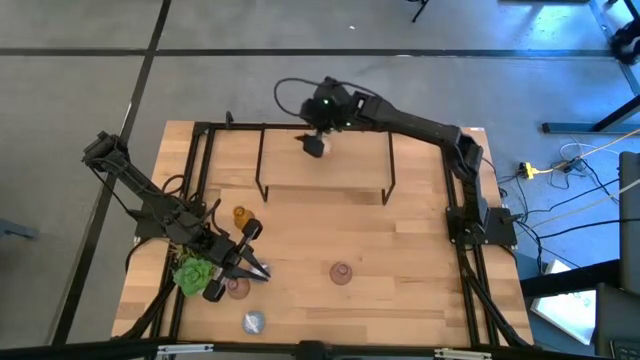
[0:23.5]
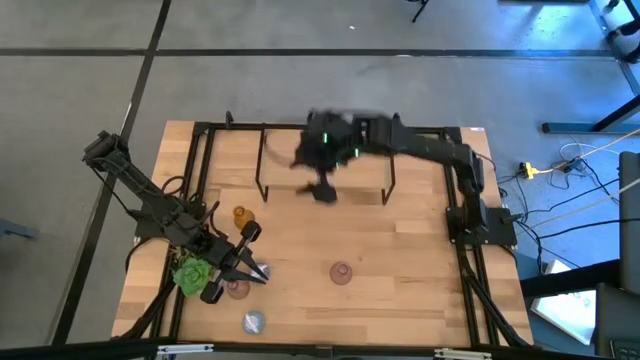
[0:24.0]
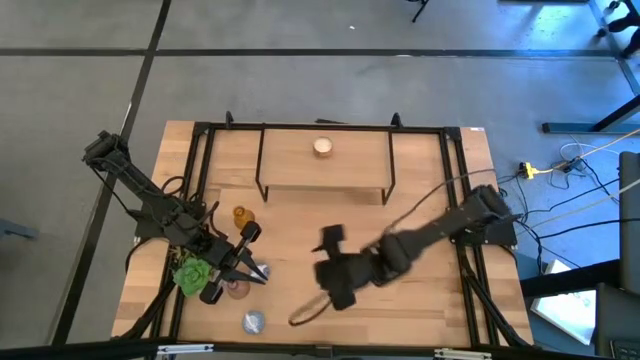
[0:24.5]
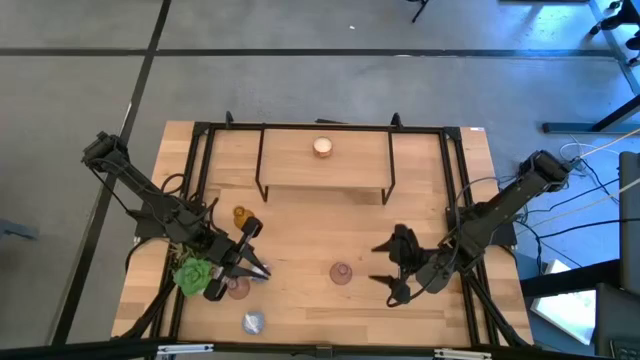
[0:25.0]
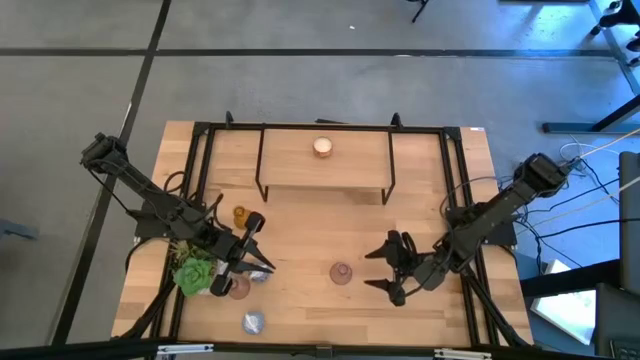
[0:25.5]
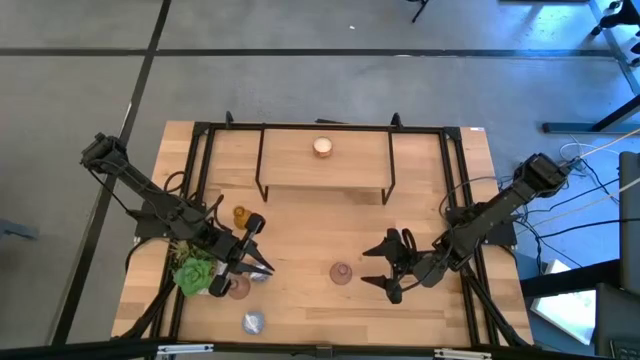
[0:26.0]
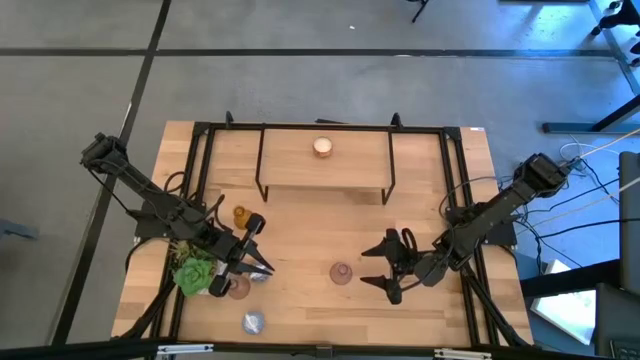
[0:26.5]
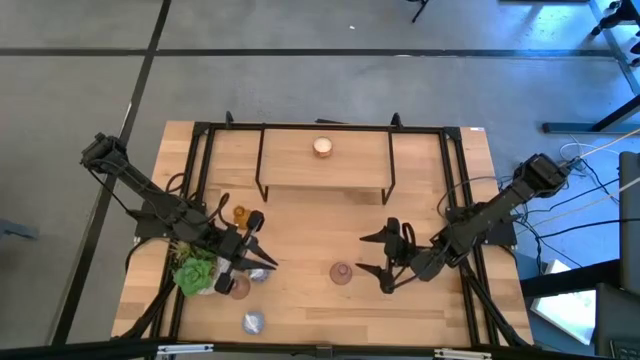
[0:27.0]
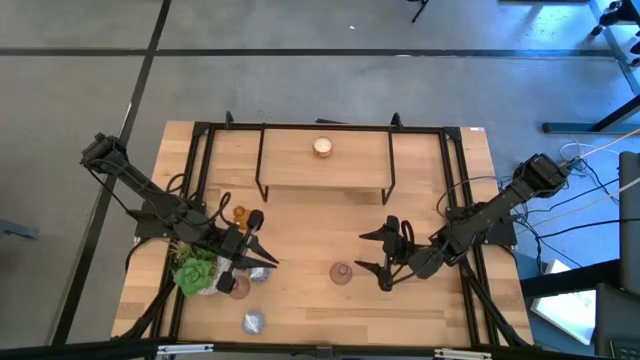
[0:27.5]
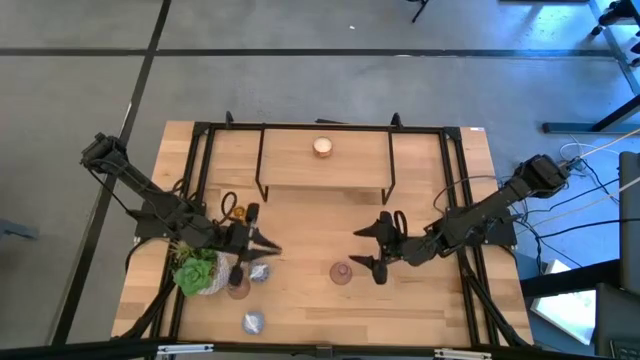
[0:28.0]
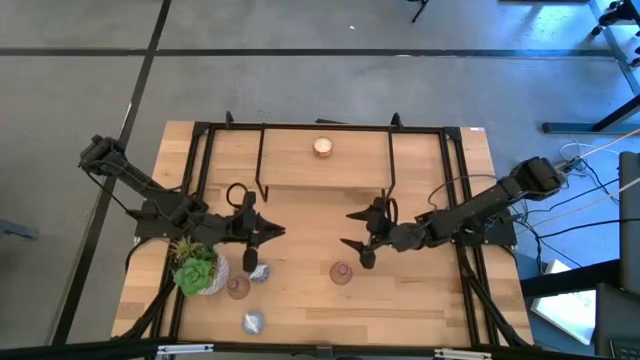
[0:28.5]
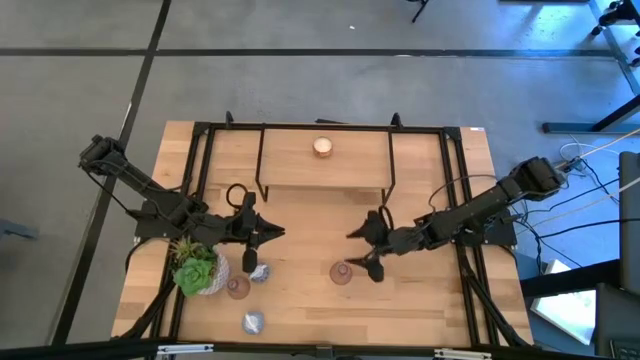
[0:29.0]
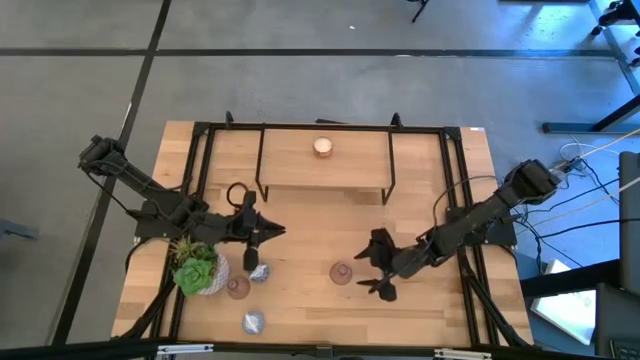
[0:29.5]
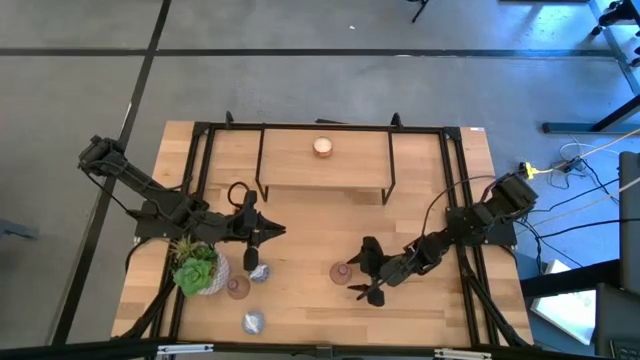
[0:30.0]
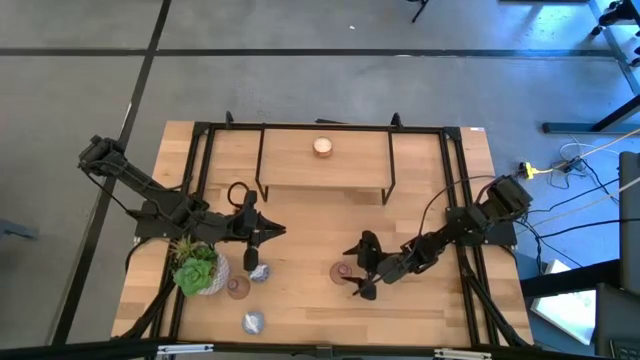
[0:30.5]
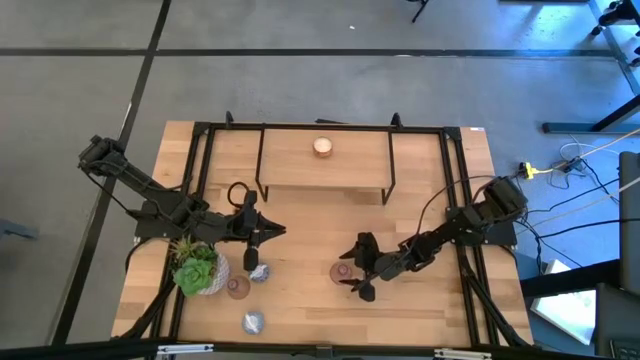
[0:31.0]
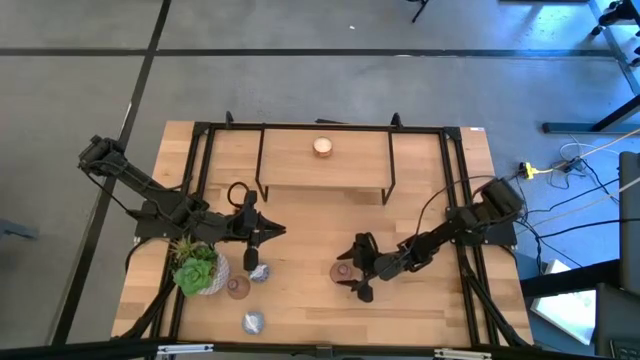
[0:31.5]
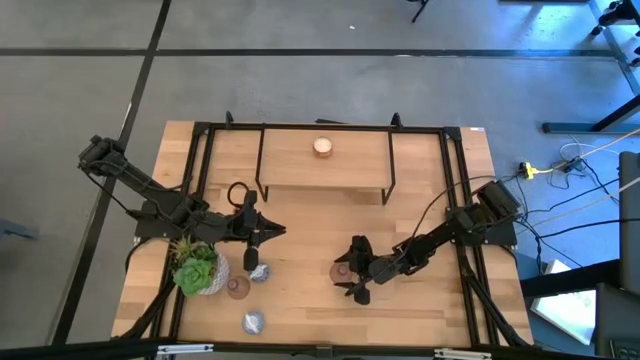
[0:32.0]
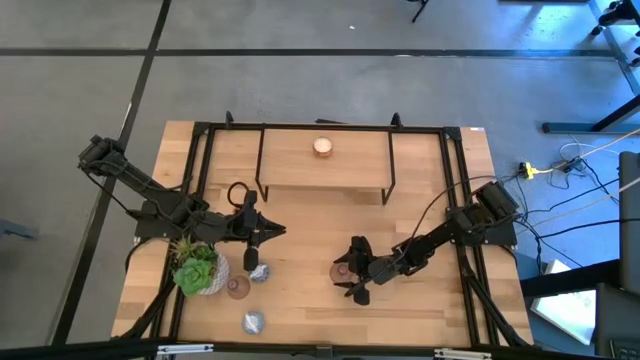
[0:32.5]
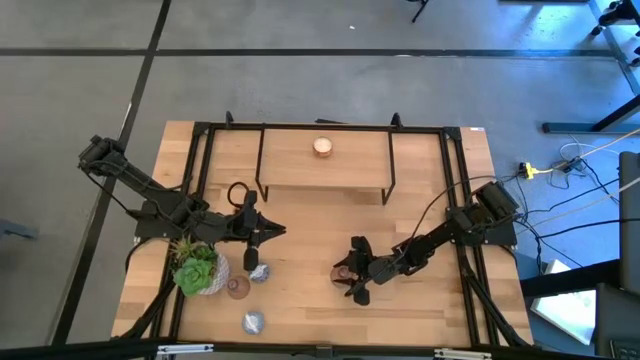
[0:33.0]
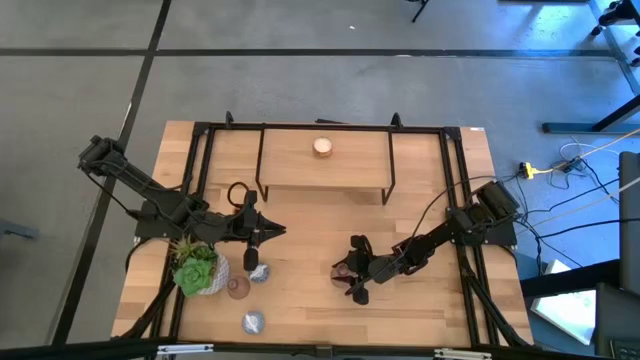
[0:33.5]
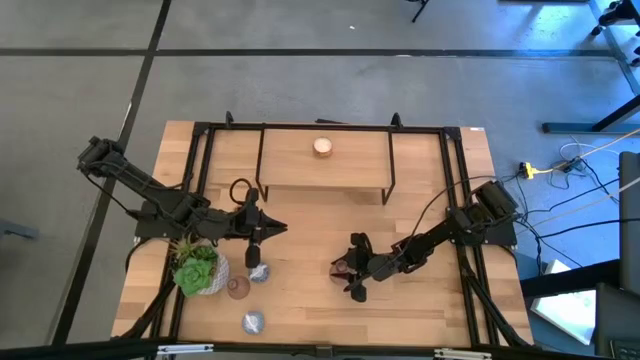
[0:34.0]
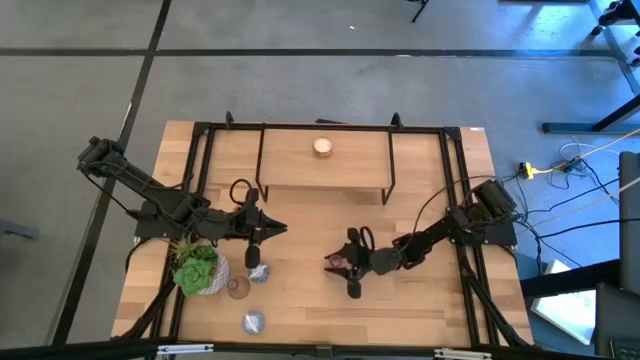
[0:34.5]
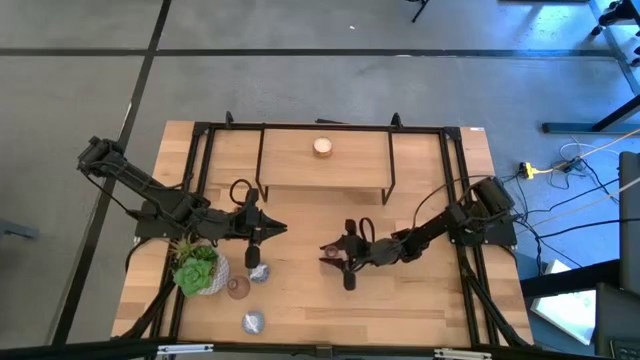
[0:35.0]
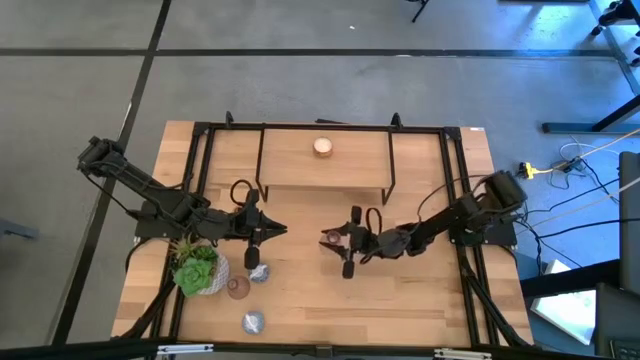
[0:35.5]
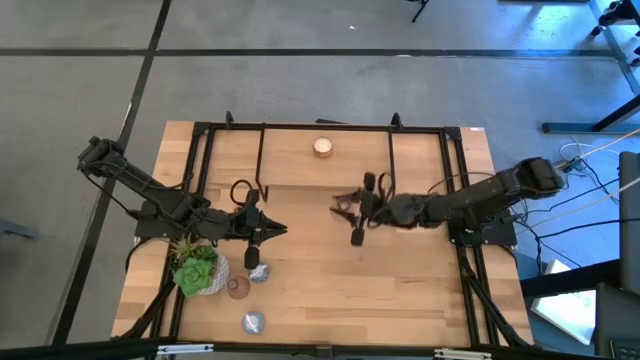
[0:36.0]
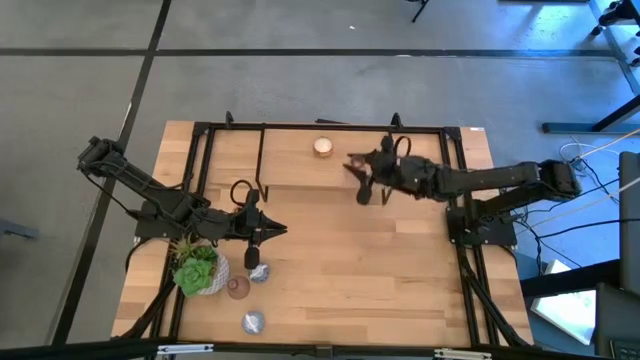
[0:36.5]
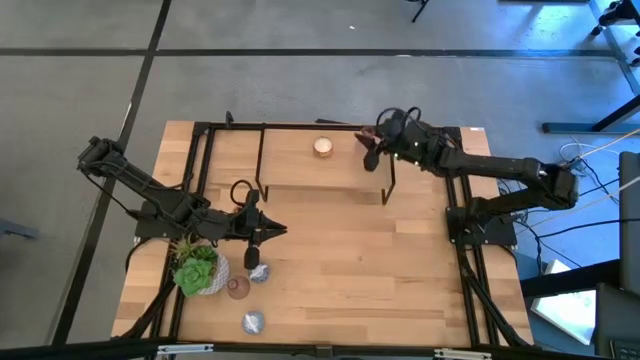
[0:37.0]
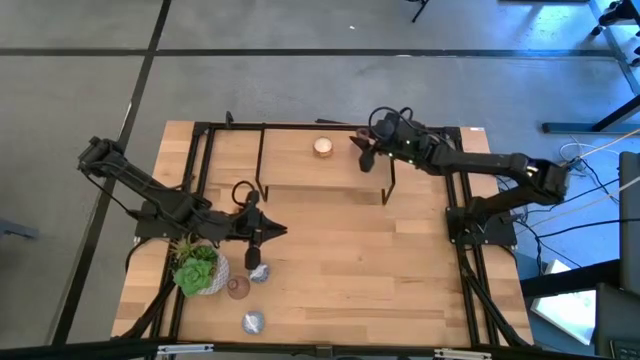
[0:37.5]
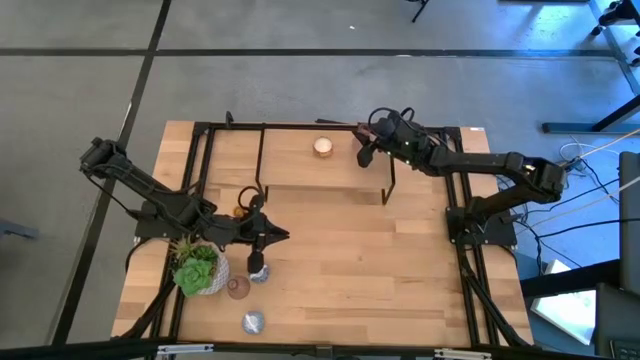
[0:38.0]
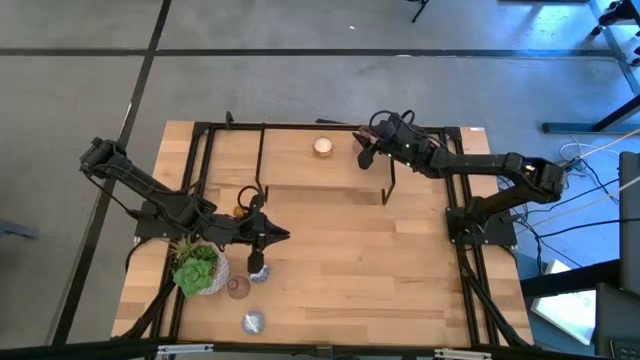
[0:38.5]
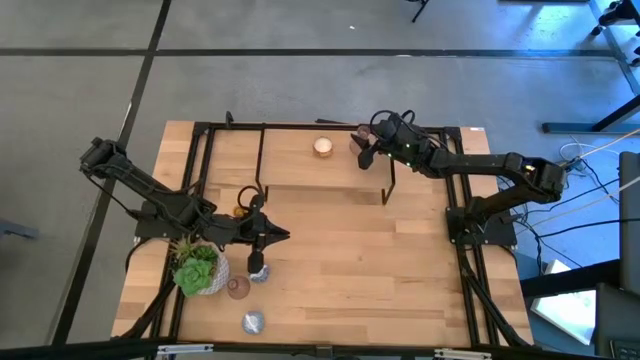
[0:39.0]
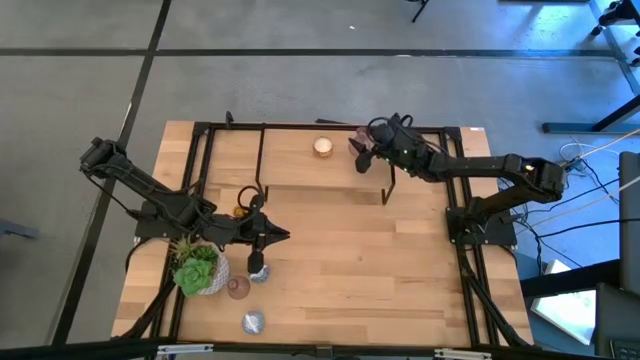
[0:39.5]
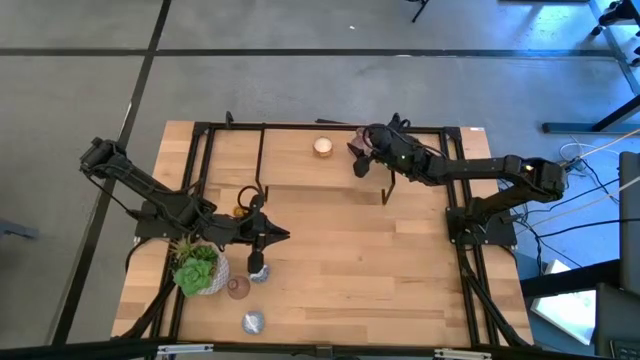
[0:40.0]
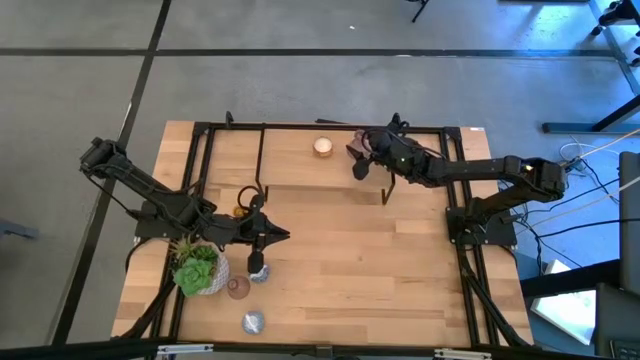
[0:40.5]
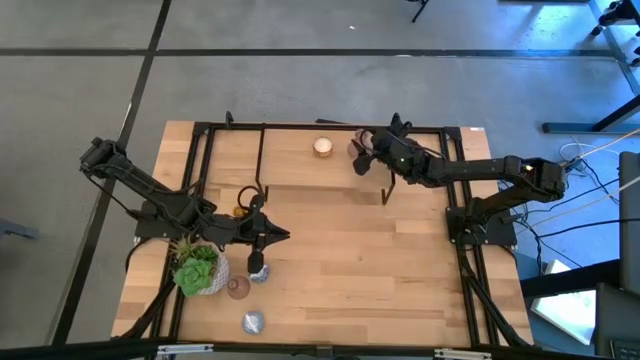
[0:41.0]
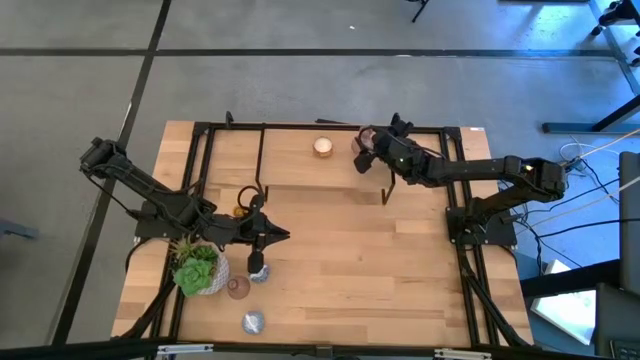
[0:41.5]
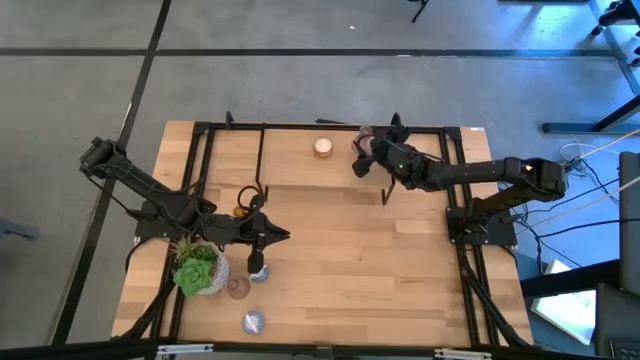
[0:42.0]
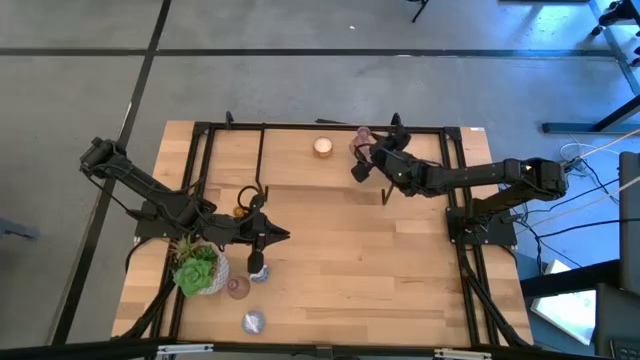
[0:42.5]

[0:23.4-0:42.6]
Task: Pick & Place candle stick holders
Put the right pink glass candle holder on the shelf
